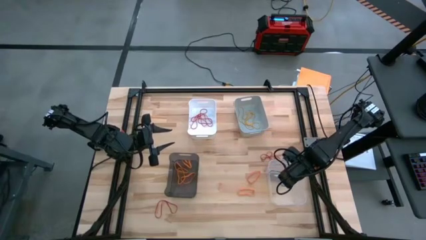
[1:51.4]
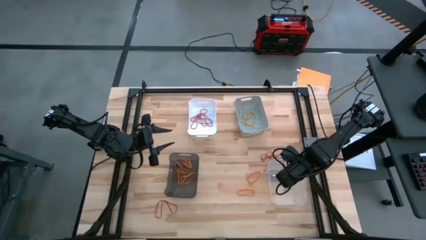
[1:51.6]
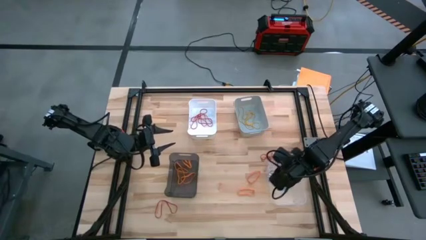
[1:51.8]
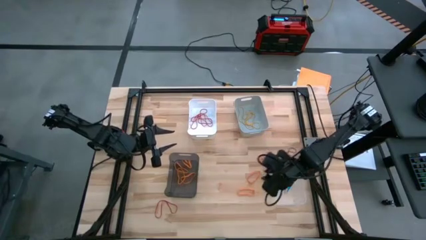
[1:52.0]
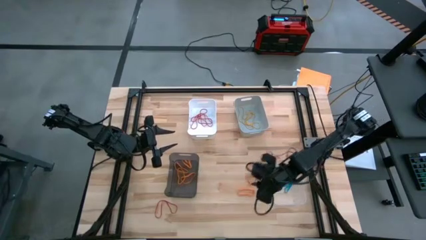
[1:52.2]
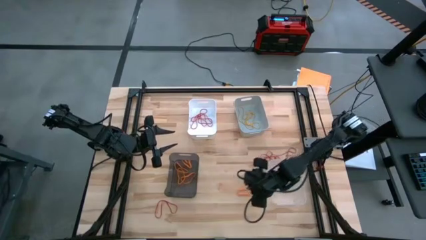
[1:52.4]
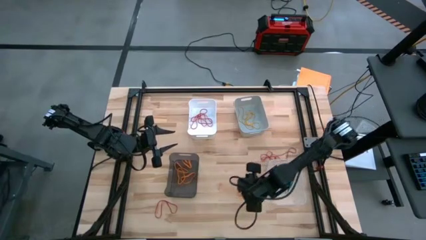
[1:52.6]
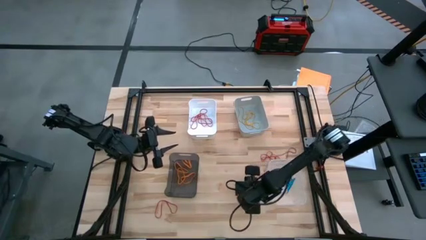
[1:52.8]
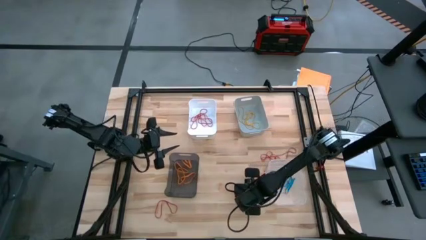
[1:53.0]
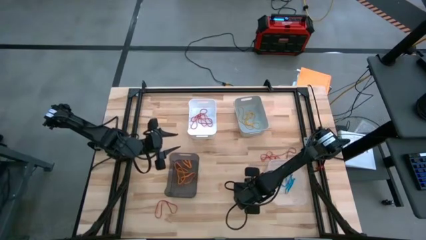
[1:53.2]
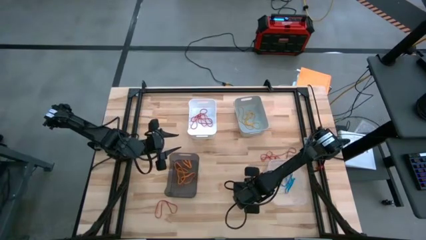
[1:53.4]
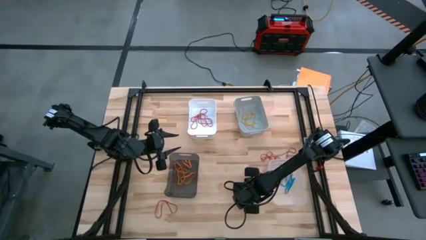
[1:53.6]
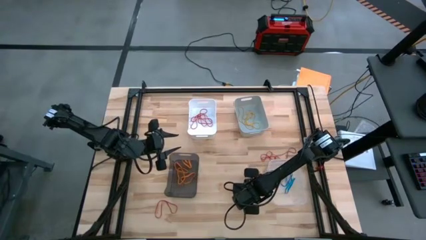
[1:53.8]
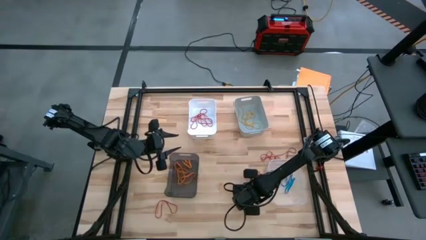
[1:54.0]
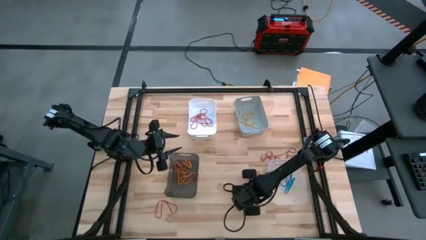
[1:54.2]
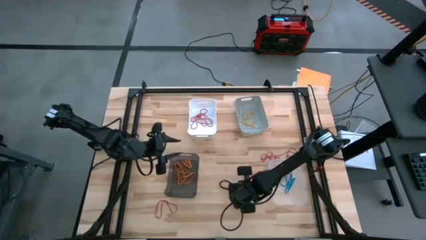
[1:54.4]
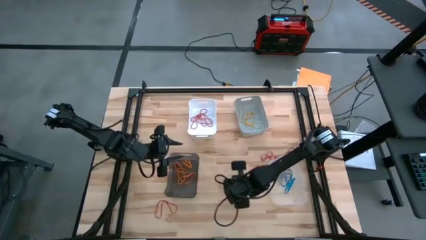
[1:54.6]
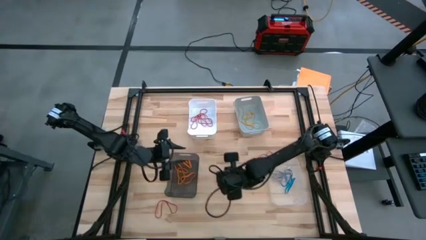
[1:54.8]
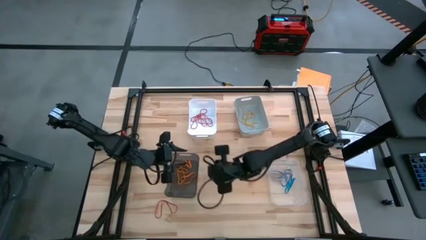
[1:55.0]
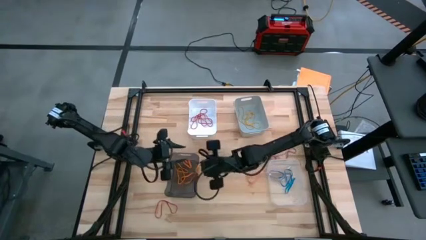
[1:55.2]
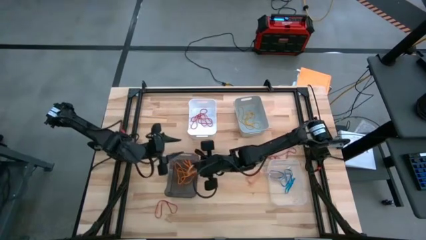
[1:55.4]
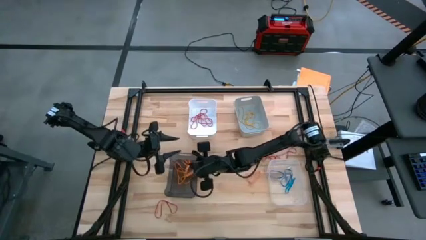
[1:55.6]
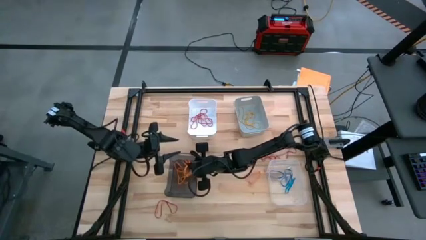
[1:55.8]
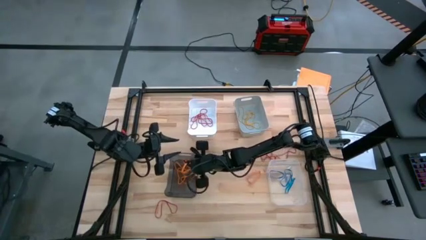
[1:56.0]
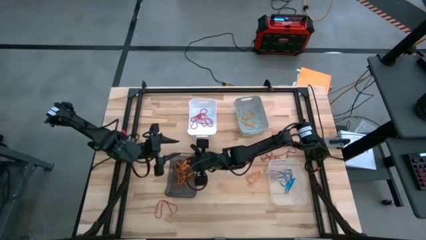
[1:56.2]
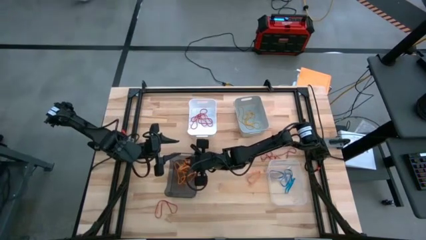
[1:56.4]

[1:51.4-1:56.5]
Task: Sort rubber bands into baskets
Put the orange rubber band into the black bin

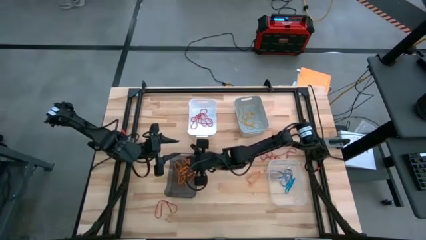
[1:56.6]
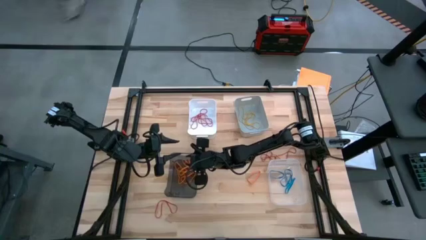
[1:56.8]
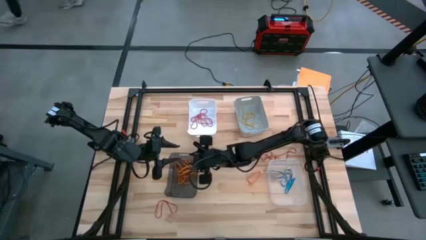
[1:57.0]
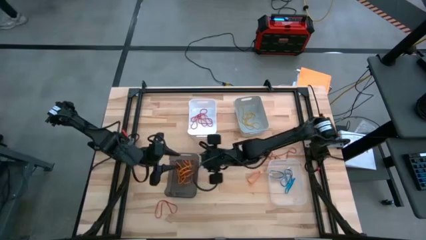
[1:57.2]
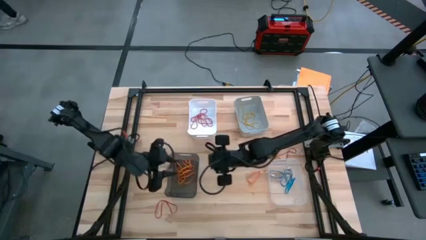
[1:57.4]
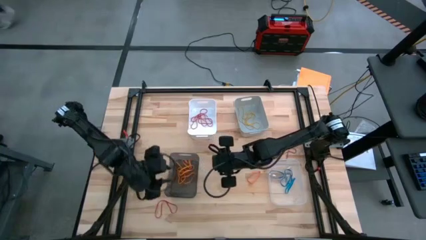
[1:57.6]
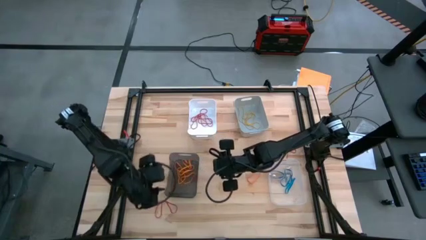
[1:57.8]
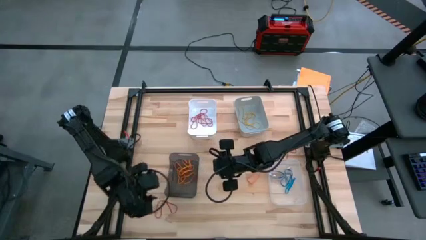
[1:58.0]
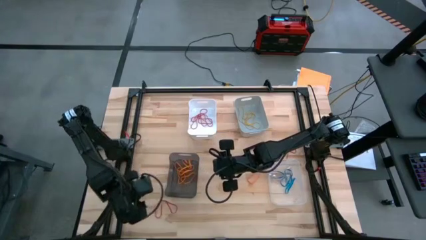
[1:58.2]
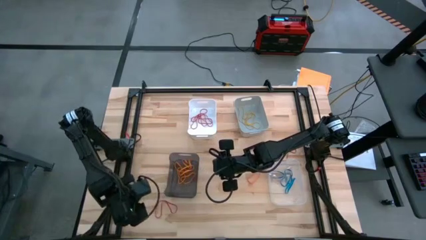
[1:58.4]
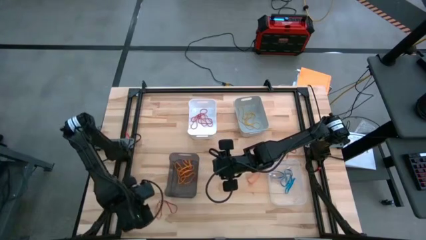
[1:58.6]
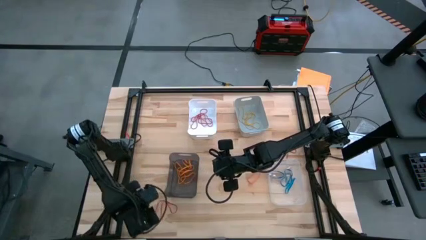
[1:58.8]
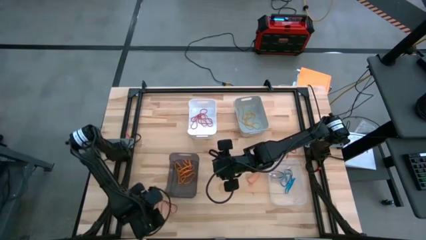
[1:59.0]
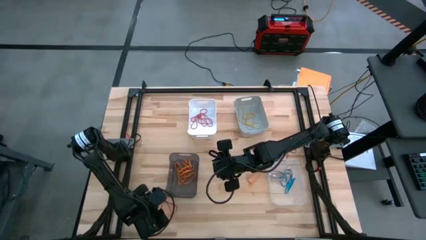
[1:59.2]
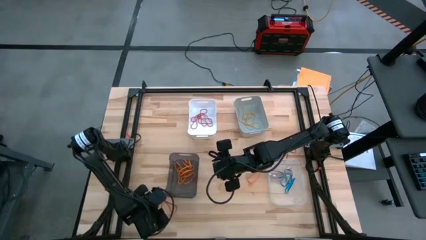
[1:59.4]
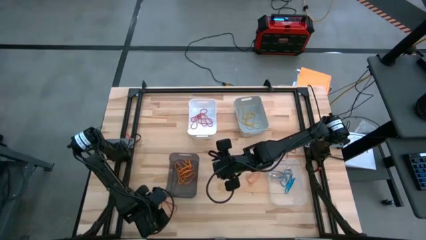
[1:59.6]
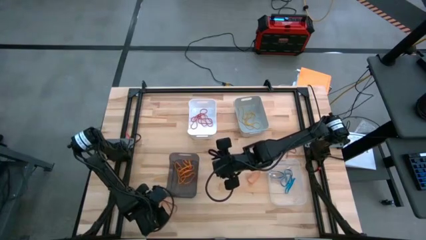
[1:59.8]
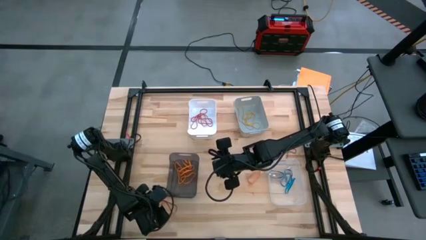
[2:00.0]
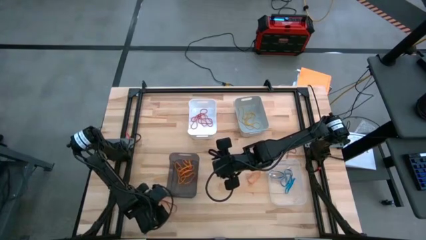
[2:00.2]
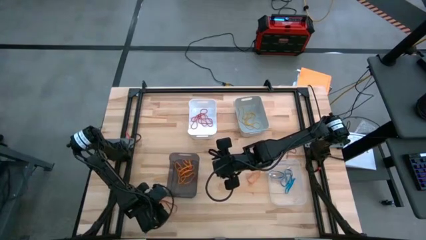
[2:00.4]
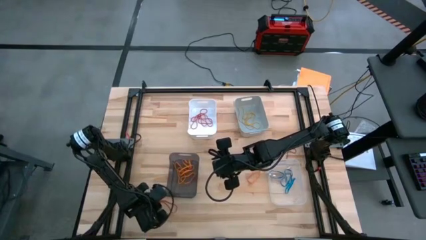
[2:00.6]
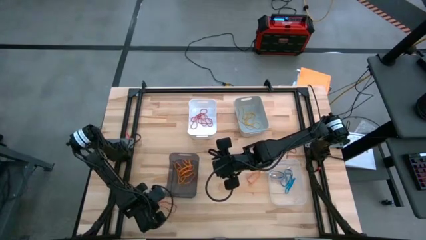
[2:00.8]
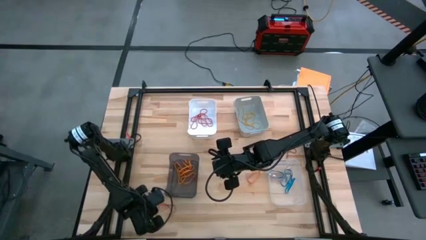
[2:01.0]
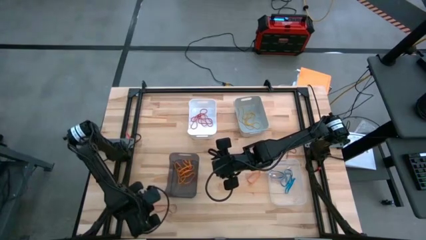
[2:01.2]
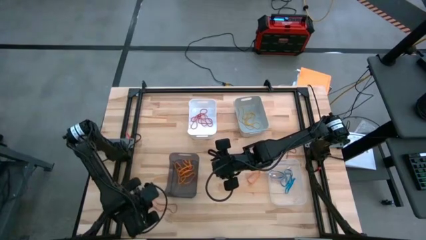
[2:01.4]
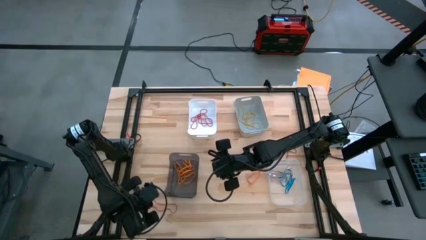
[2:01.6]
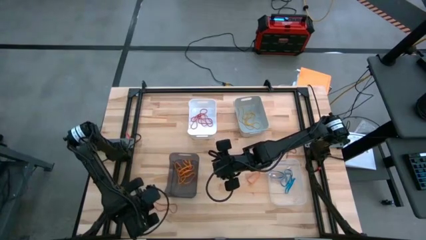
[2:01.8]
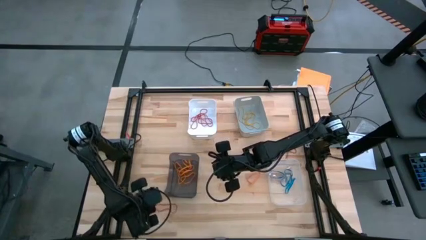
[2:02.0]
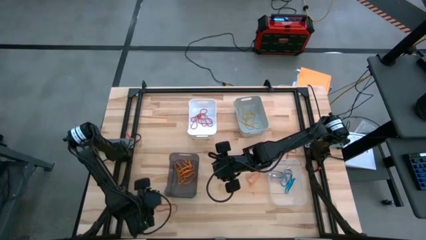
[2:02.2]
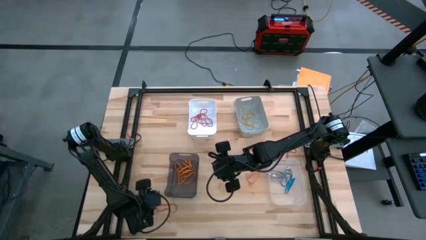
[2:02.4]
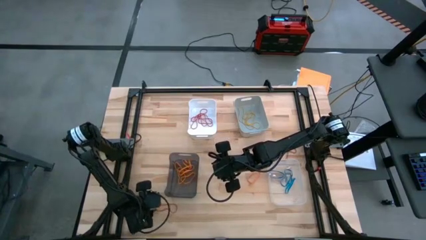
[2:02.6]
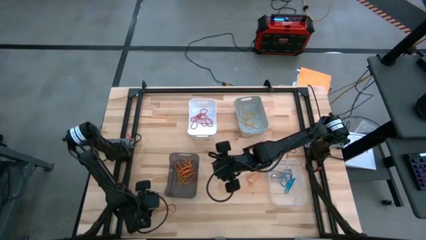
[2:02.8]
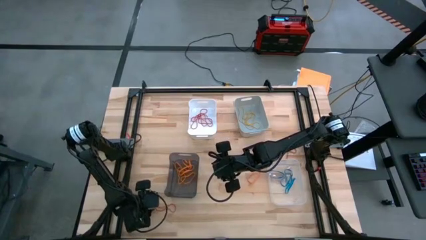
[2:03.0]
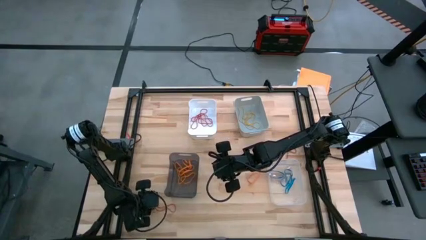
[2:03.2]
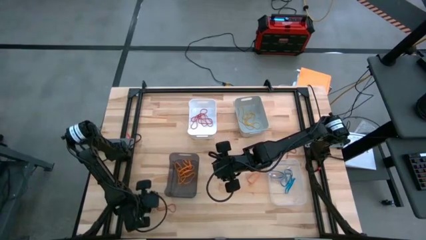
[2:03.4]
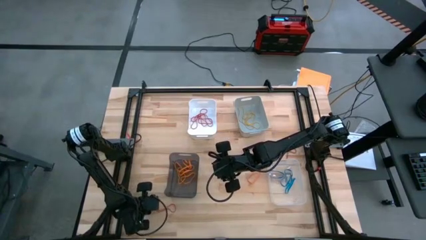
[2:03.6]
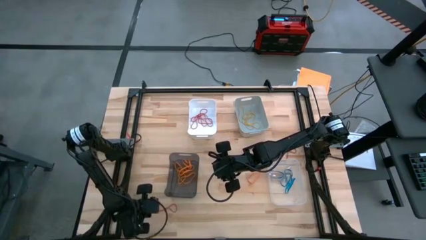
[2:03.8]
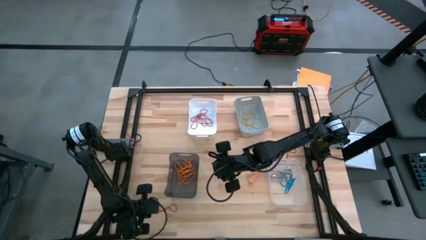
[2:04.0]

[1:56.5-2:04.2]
Put the red rubber band into the white bin

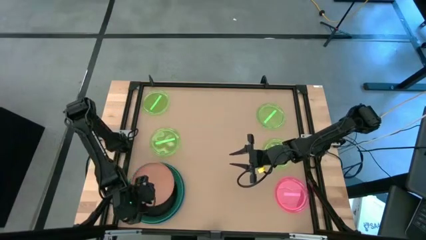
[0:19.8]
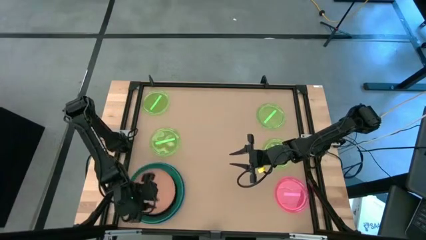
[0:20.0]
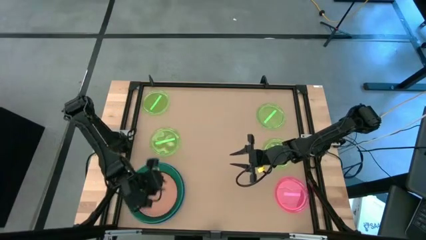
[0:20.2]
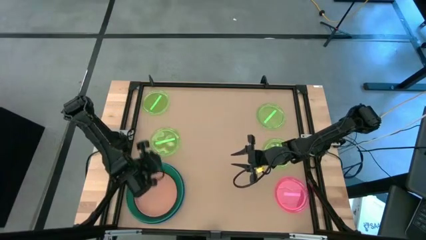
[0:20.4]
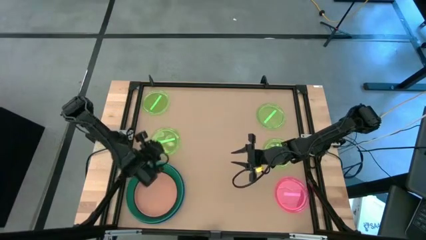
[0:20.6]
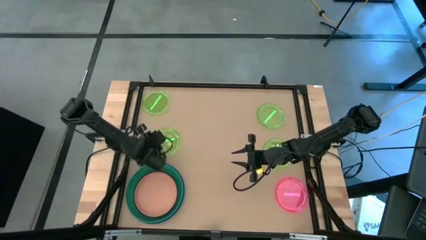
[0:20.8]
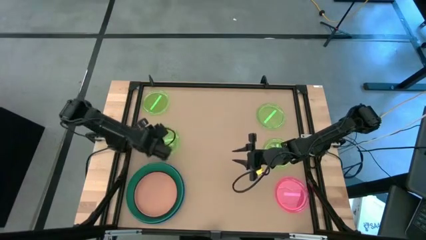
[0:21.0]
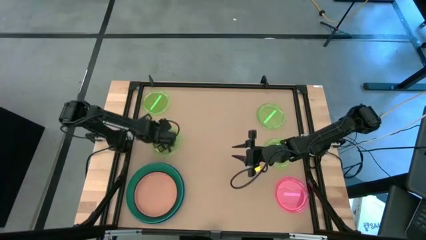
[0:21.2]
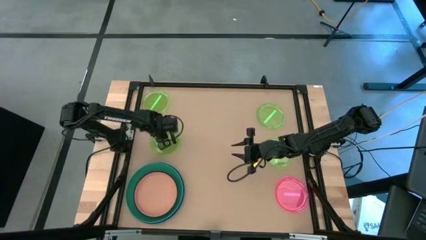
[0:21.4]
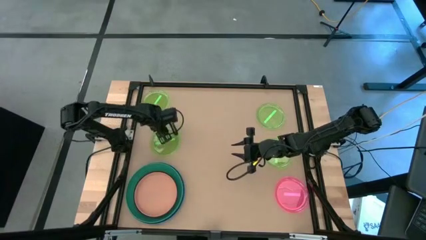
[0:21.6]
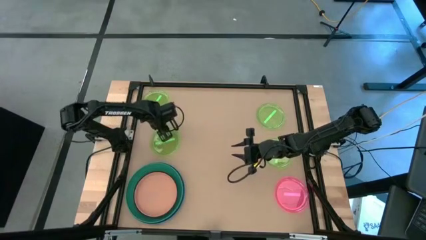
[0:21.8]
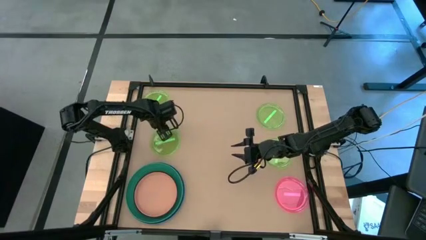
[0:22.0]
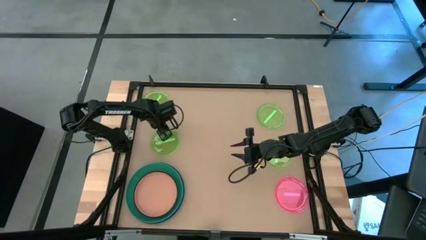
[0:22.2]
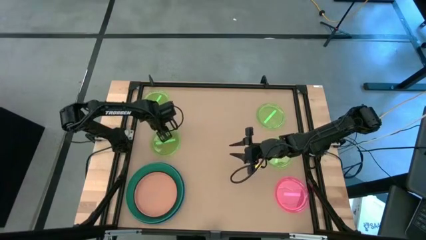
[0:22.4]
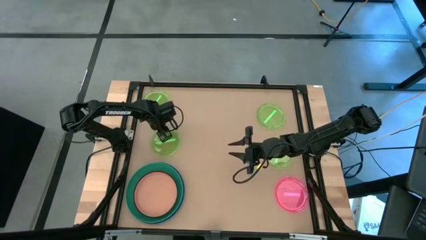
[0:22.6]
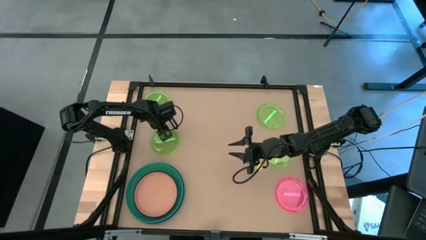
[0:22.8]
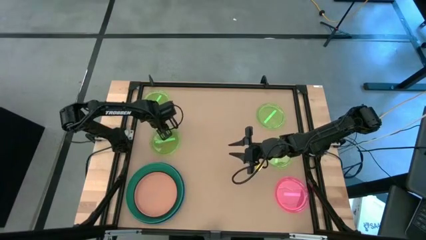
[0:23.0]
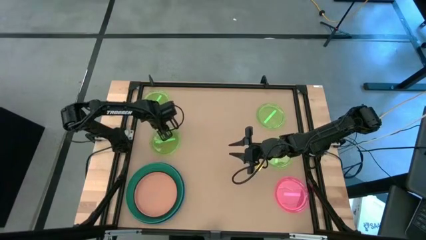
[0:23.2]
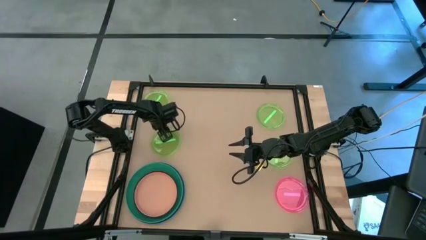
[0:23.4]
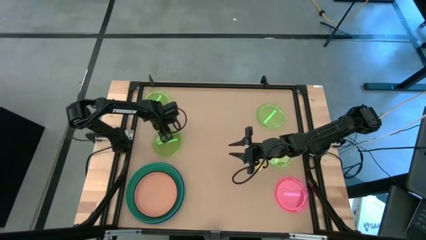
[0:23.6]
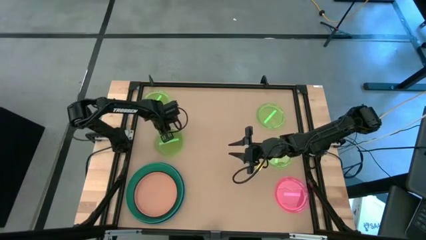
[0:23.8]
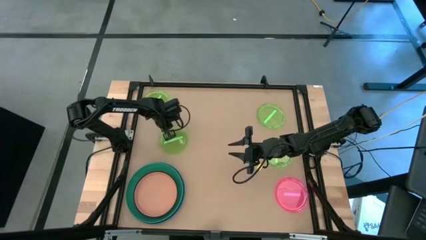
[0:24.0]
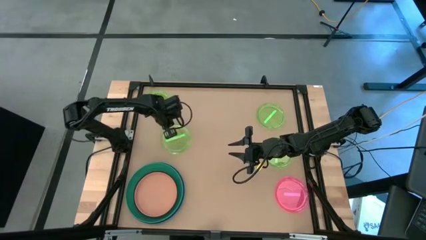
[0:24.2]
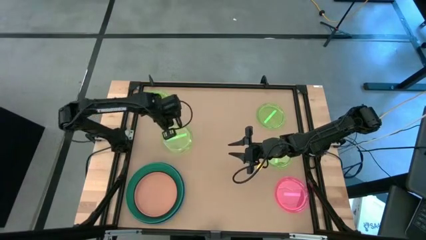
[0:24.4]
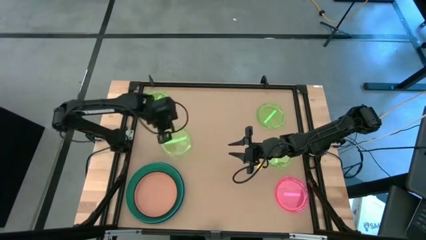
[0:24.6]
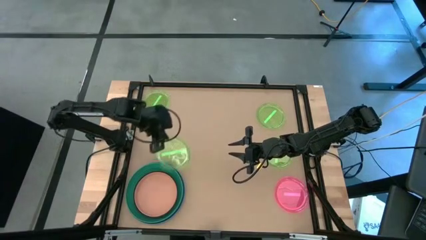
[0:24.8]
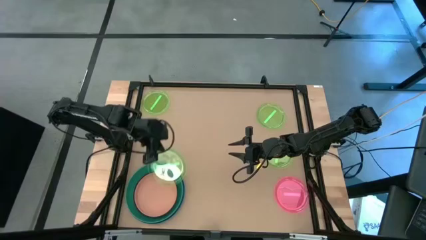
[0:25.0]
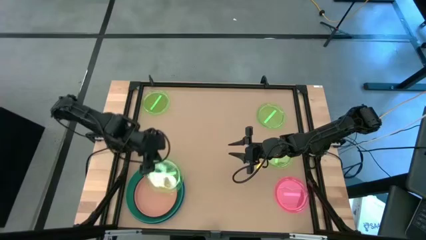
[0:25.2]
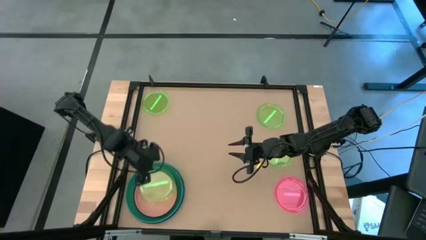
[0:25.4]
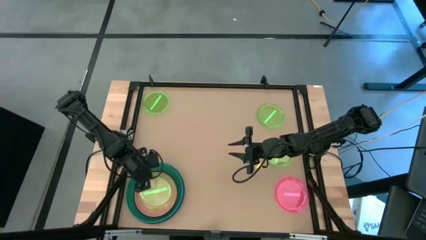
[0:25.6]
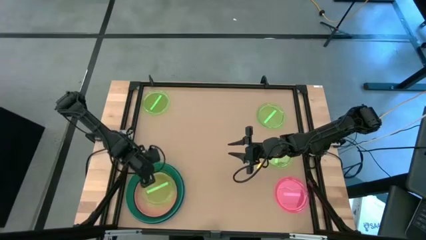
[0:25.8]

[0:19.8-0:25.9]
Task: Stack plastic plates
Stack the green plate on top of the orange plate
